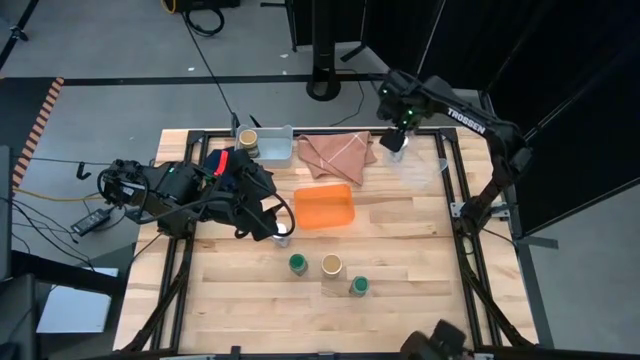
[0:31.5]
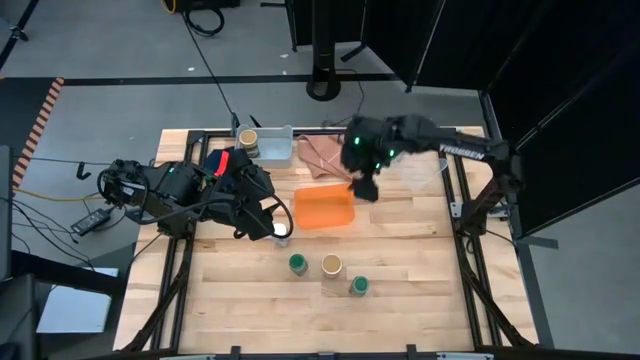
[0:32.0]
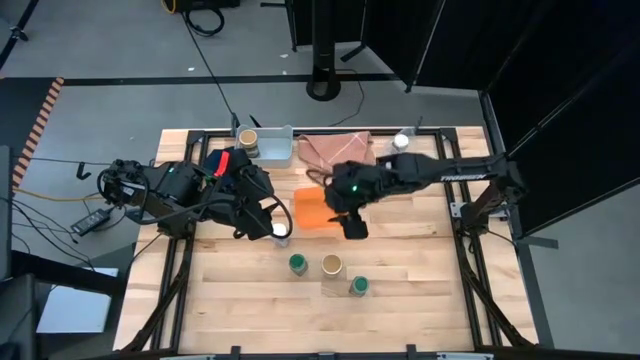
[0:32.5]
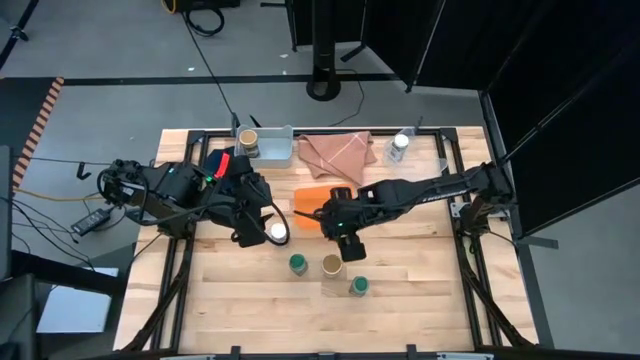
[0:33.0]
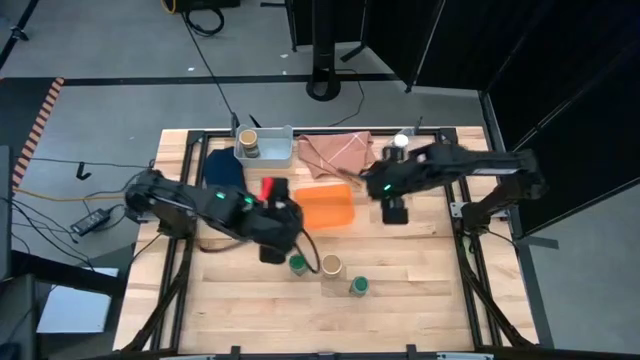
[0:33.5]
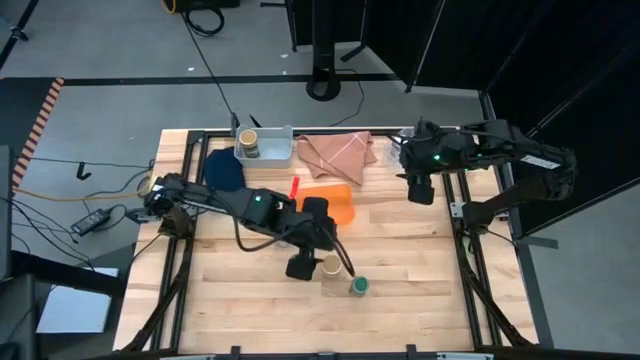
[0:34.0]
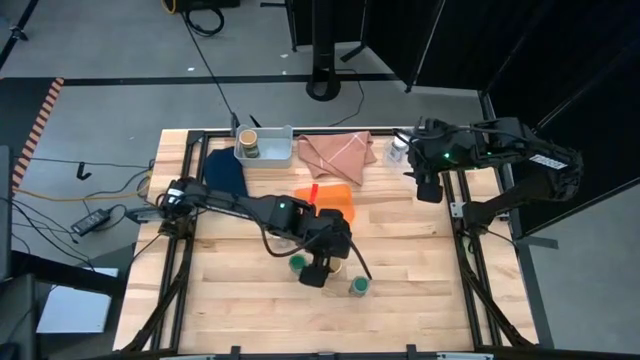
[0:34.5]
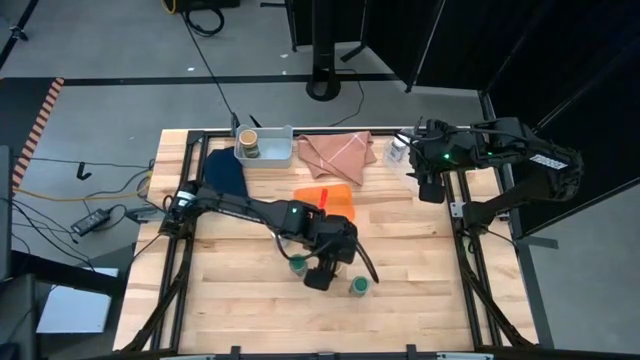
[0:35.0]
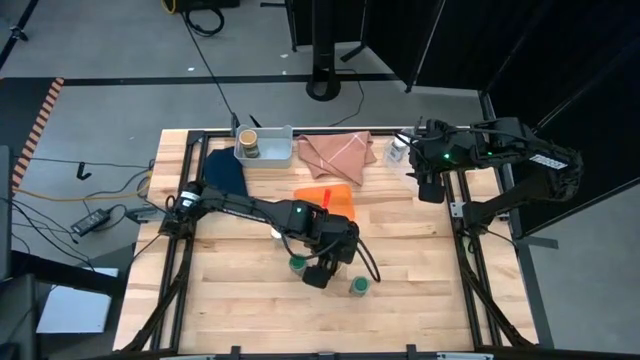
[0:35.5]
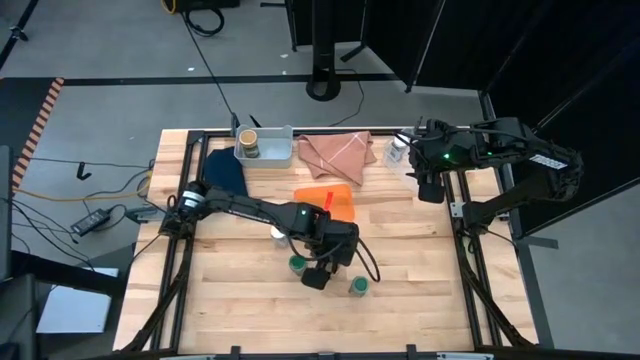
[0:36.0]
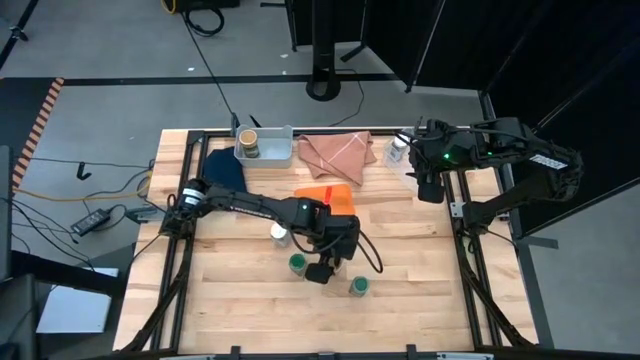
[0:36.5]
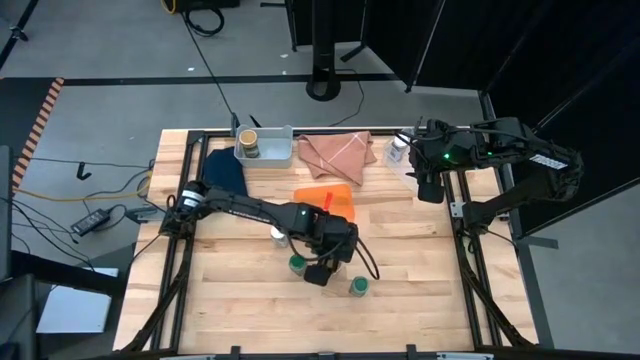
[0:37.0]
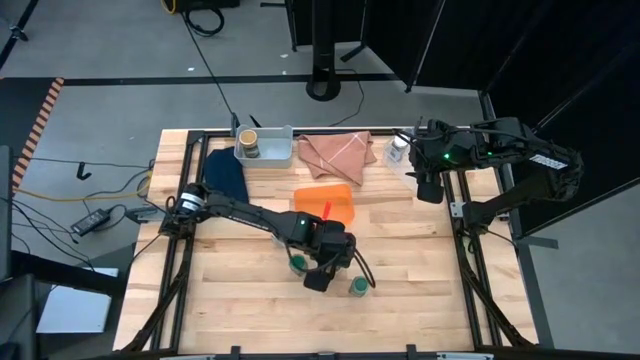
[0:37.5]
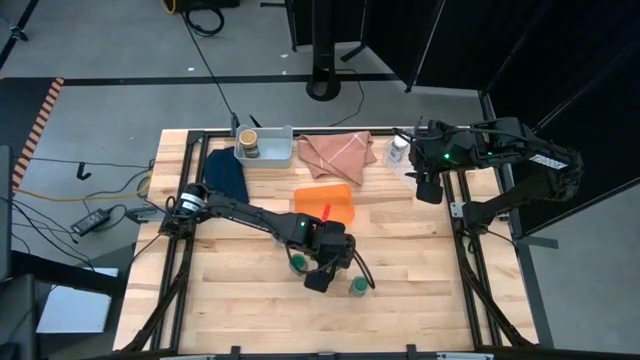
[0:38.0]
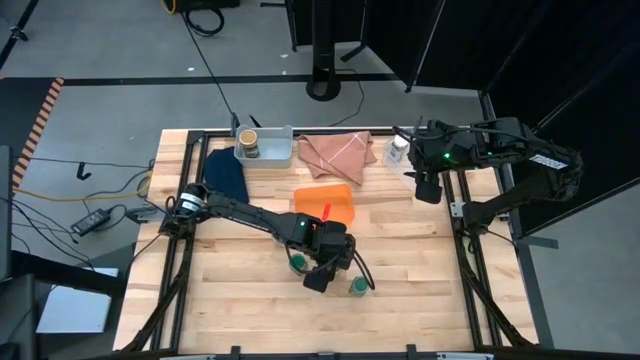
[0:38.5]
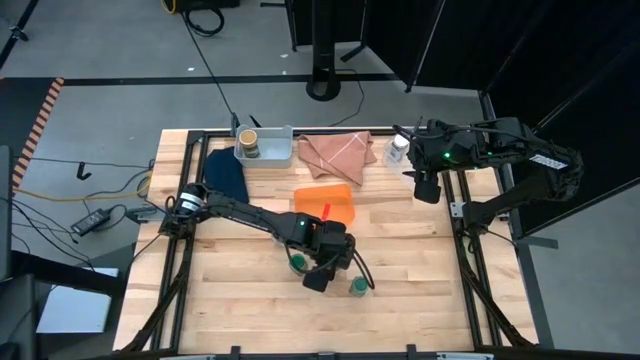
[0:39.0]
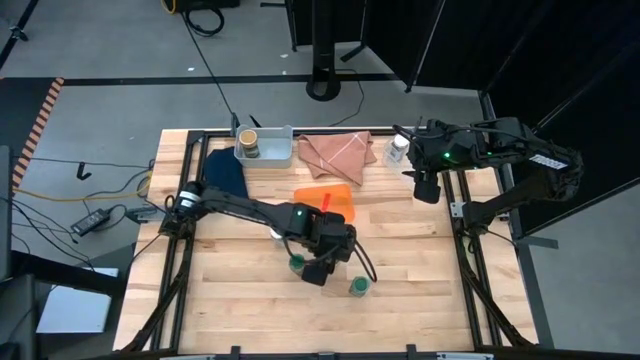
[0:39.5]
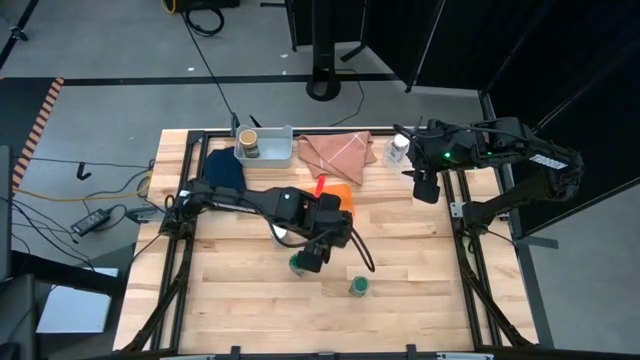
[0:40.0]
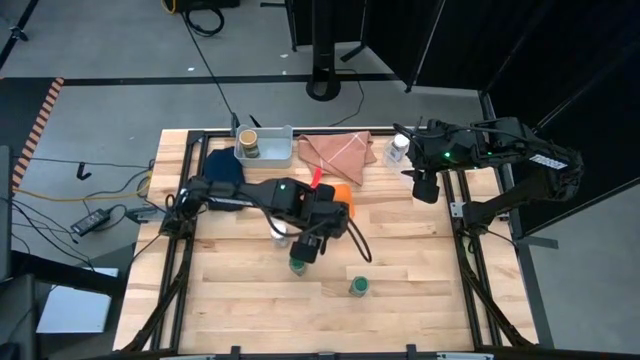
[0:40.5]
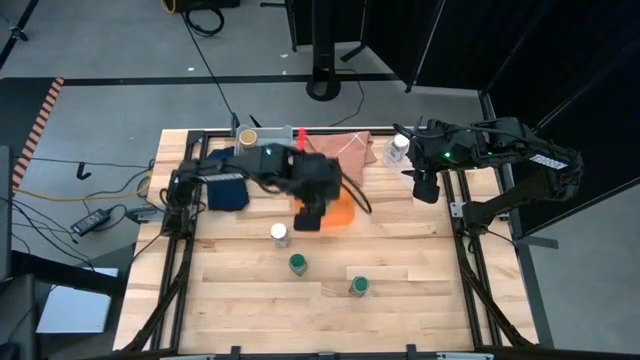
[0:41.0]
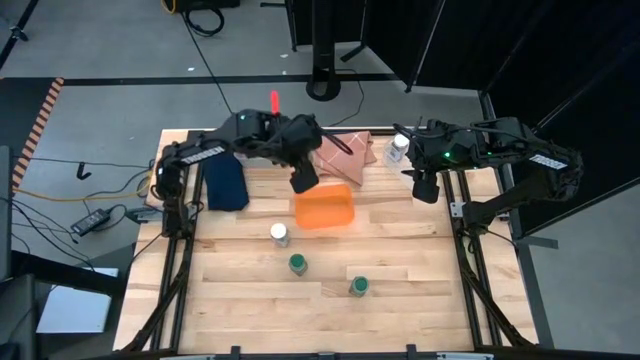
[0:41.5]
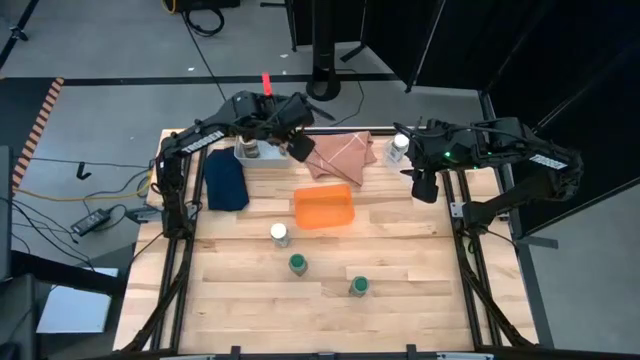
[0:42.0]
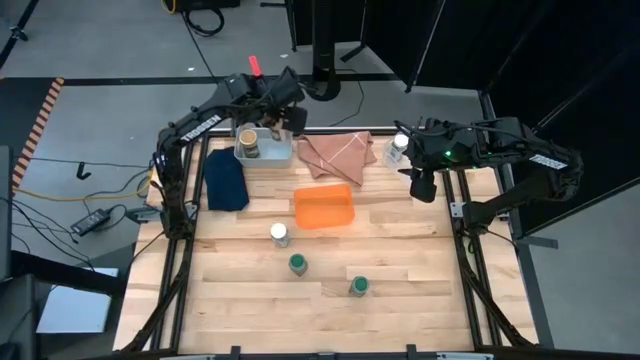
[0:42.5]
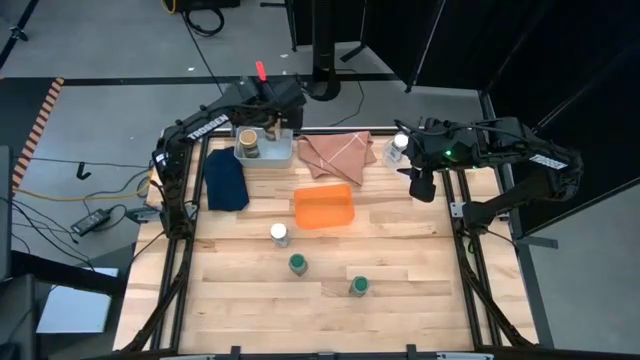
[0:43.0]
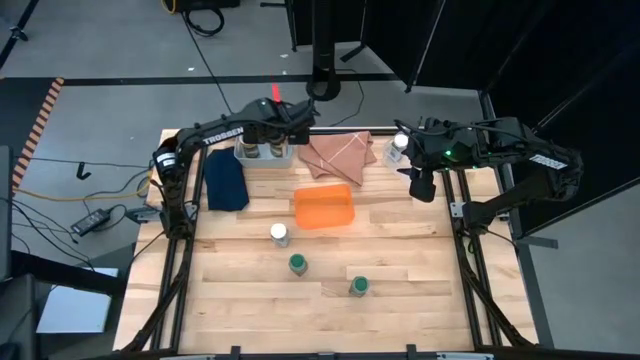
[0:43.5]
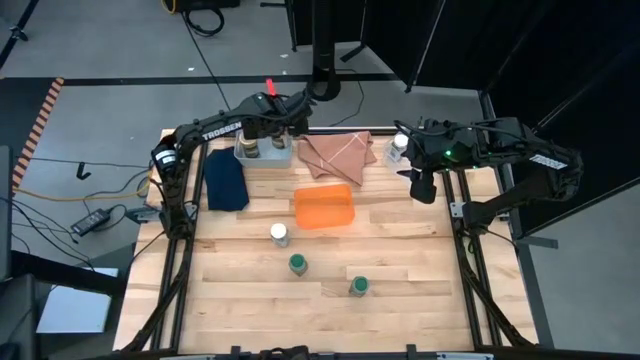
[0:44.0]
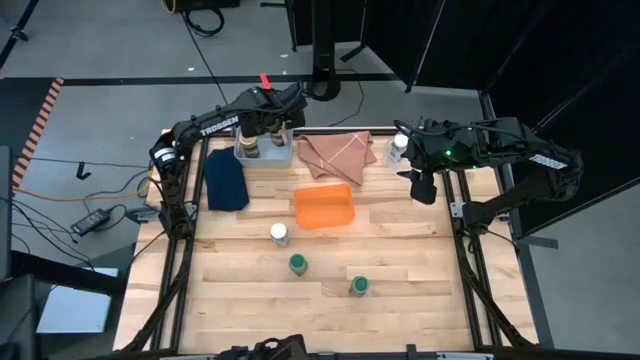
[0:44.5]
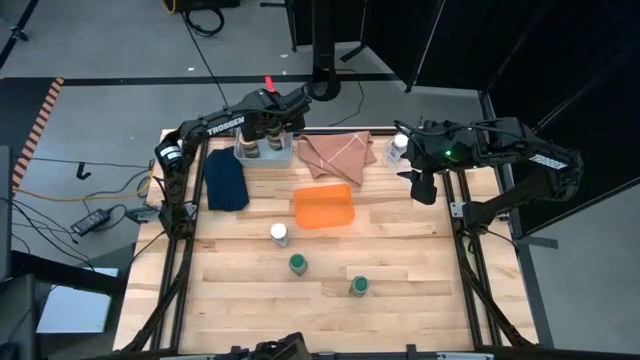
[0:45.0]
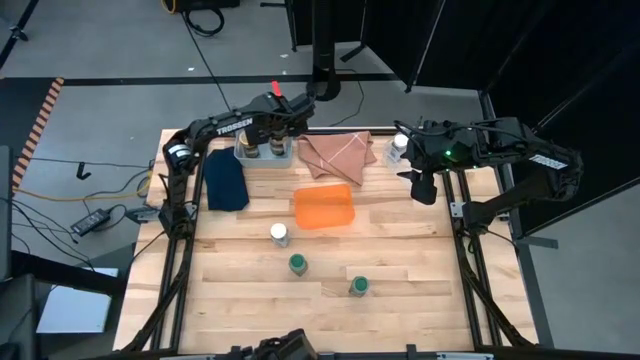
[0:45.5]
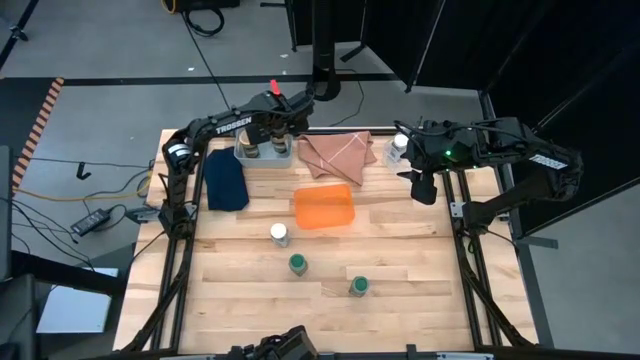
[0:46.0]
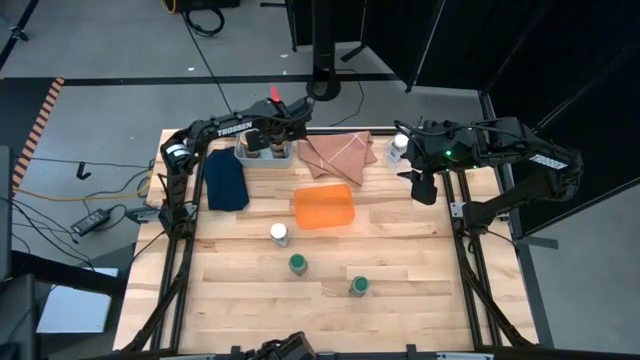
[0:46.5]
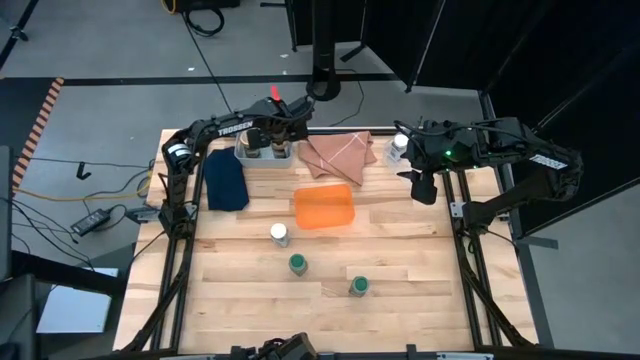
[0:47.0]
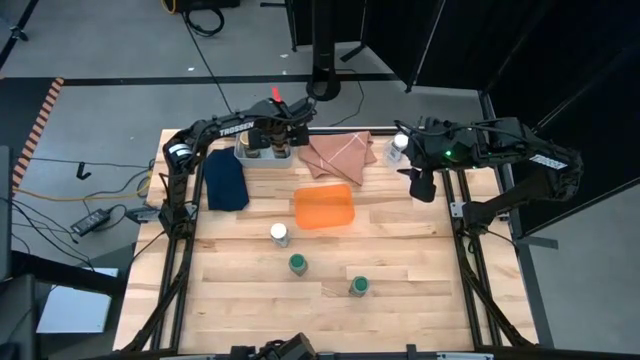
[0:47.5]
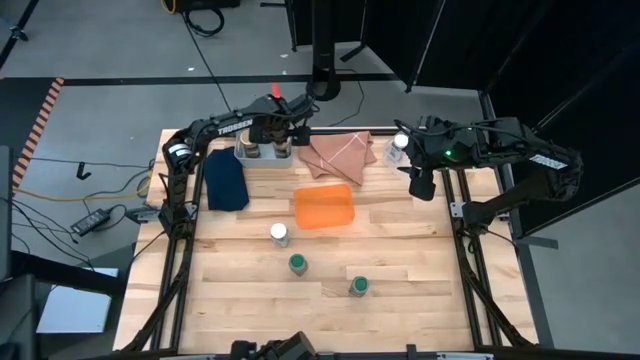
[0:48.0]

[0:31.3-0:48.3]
Task: Sort spices by type
Put the gold seasoning bottle into the gray bin

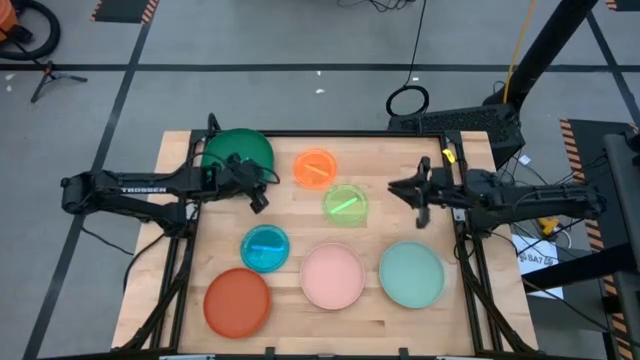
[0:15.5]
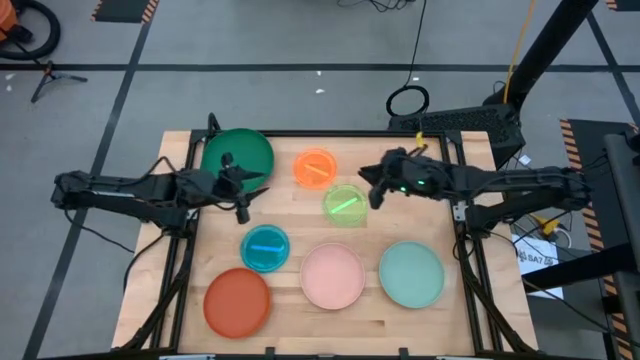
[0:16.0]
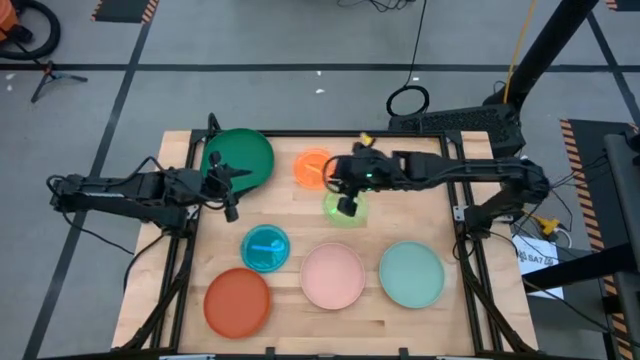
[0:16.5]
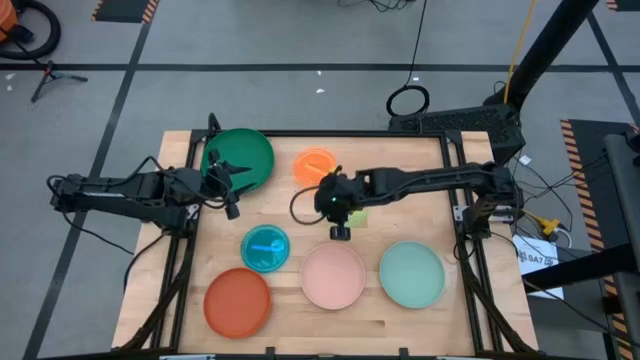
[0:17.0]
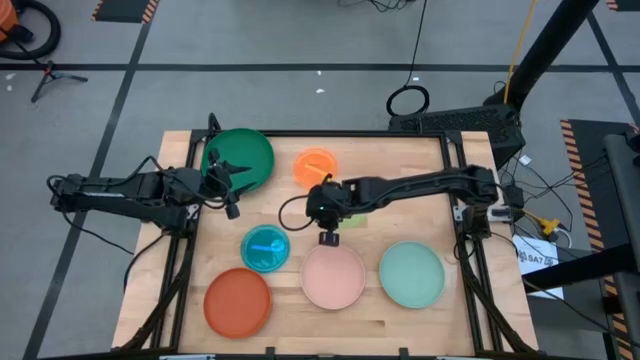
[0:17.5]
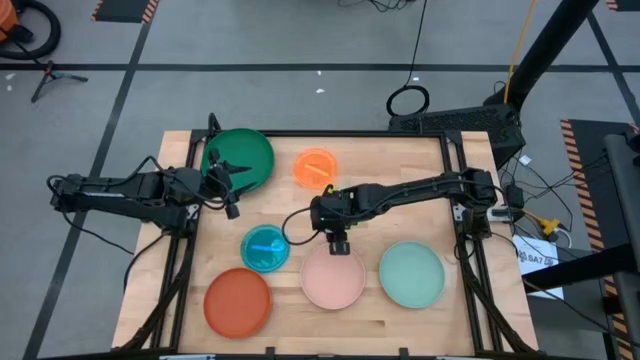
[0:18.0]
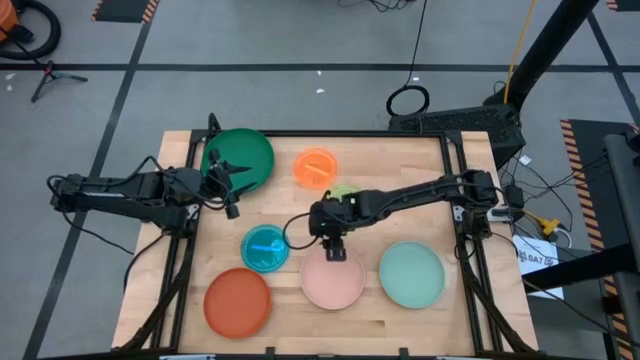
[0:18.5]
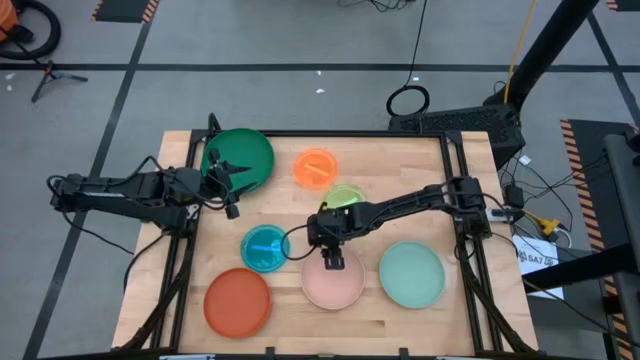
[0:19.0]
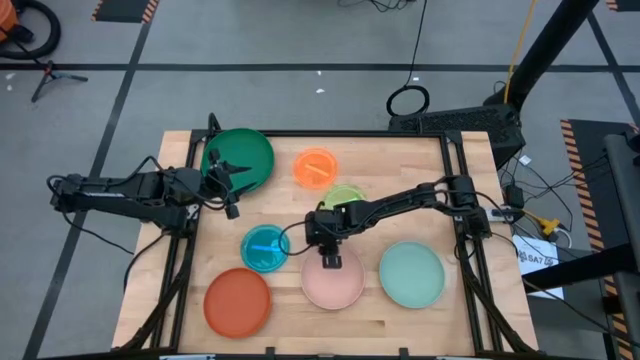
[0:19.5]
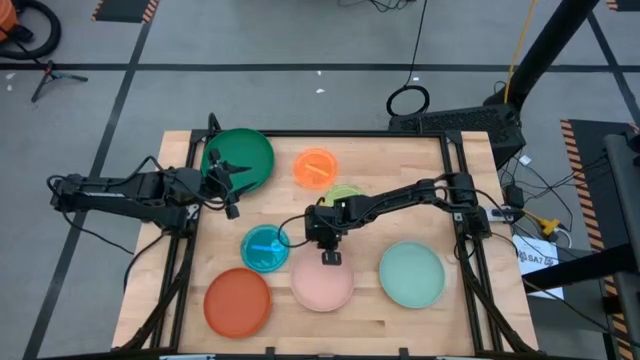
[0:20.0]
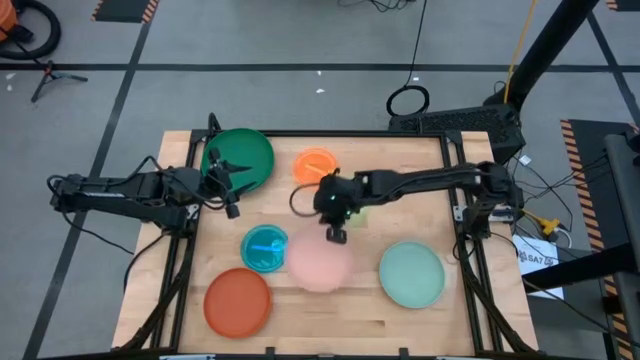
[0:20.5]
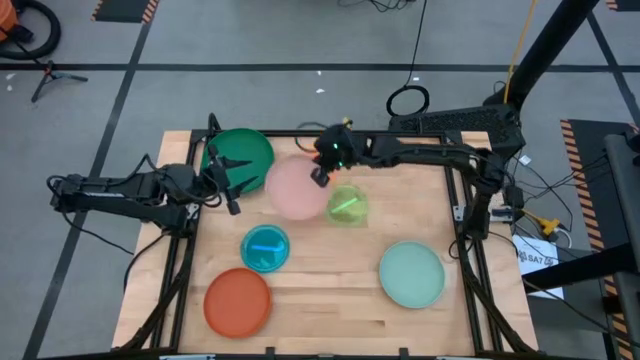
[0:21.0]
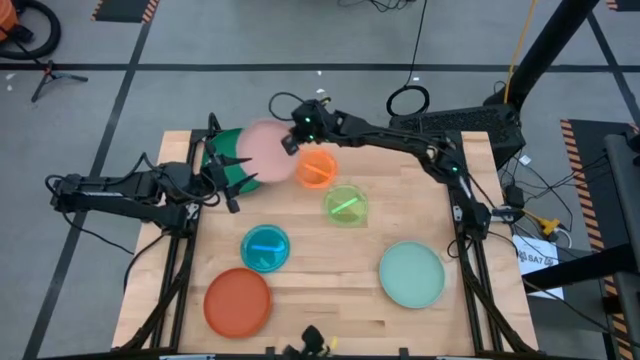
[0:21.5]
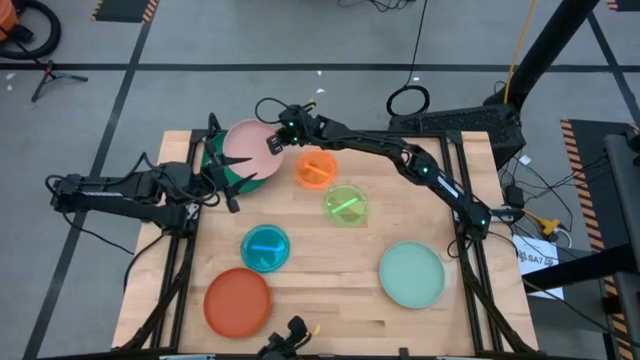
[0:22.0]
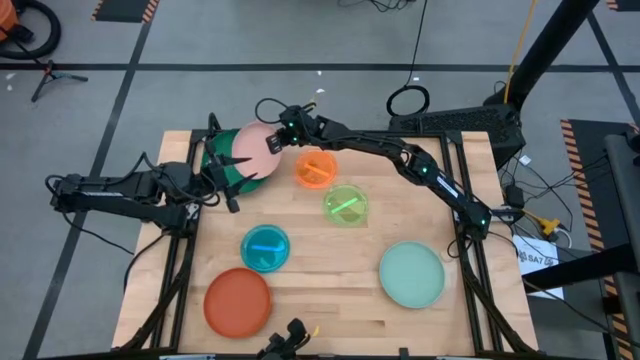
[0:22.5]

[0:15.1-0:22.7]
Task: Stack plastic plates
Stack the pink plate on top of the green plate
